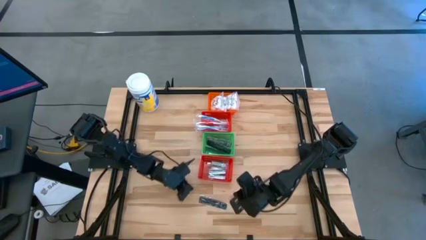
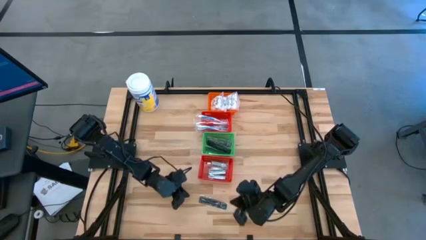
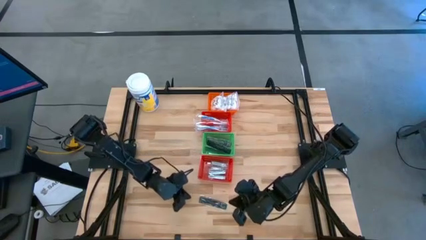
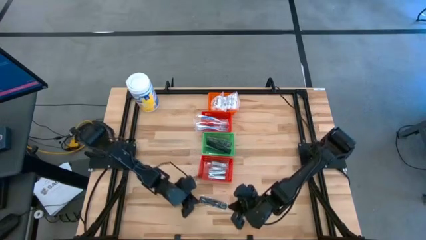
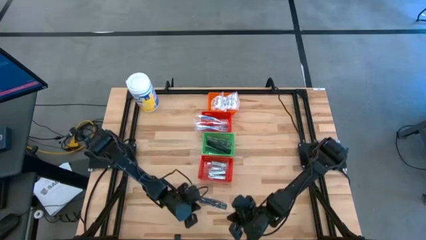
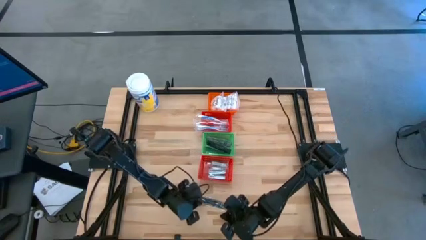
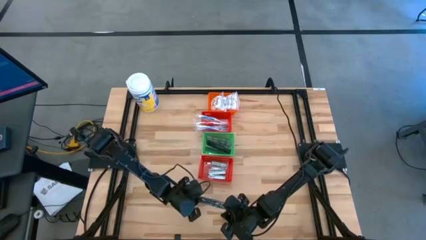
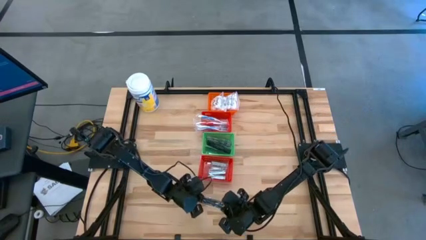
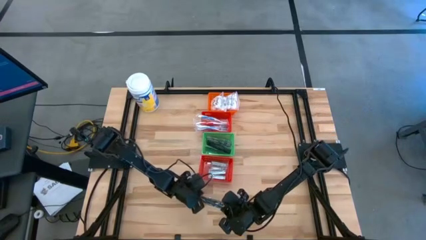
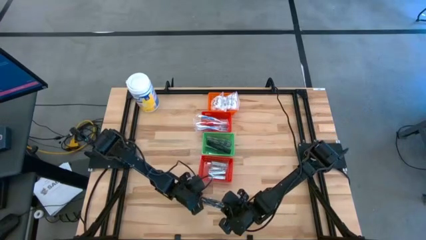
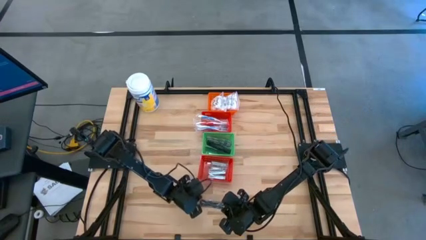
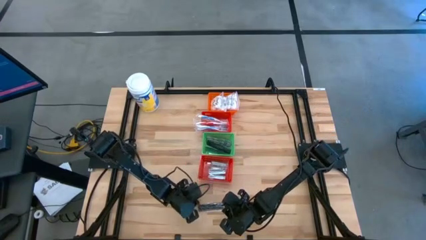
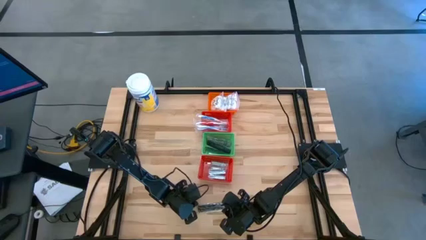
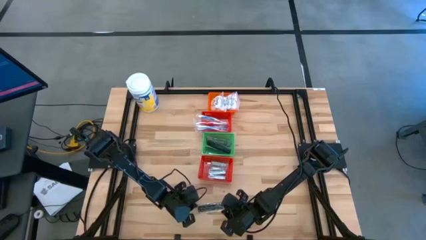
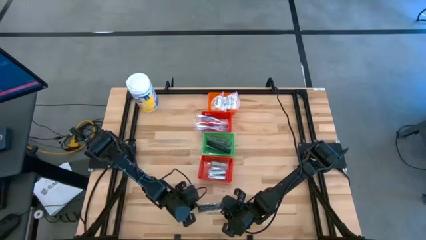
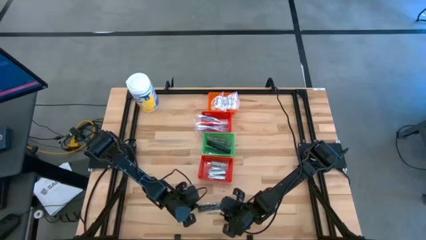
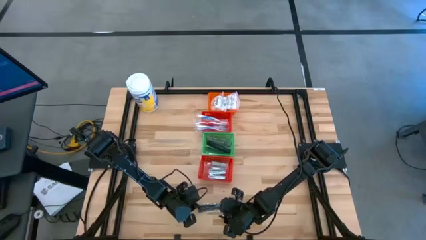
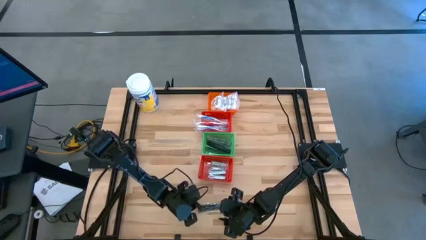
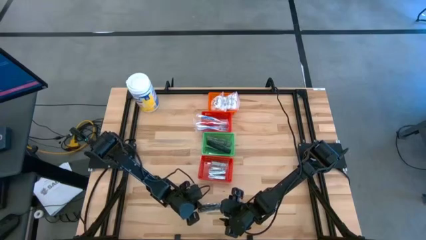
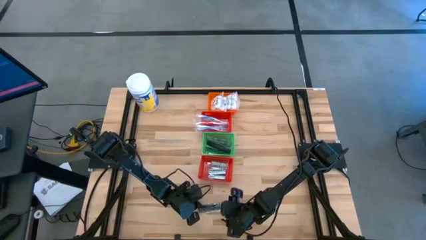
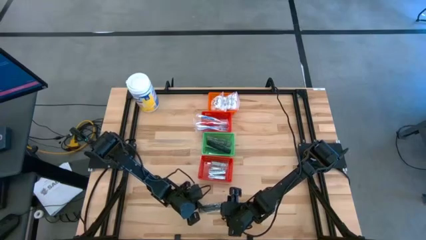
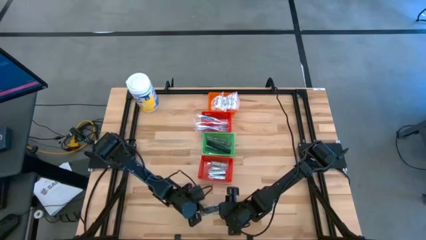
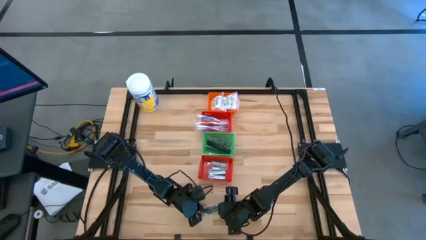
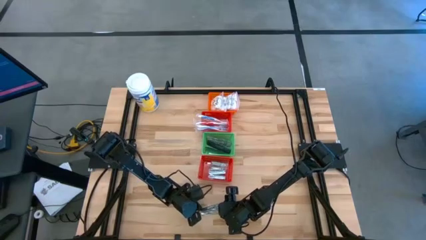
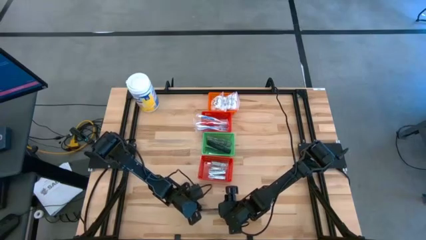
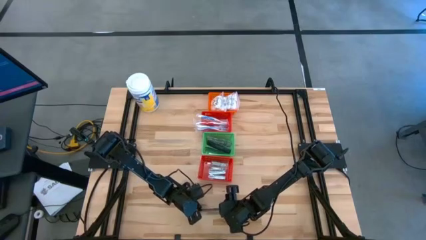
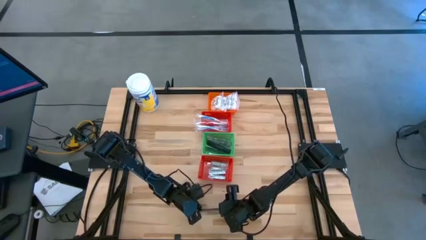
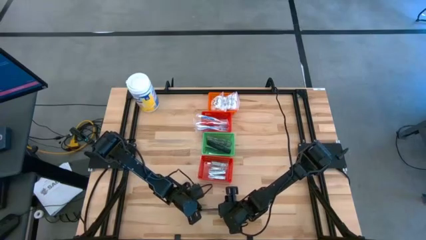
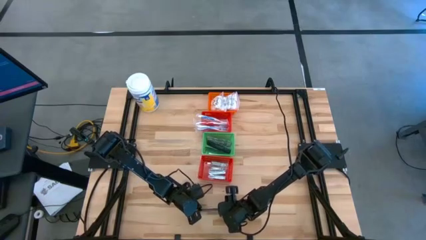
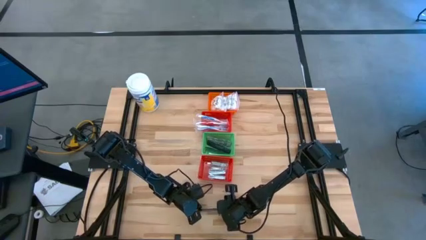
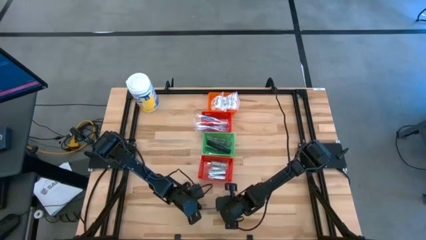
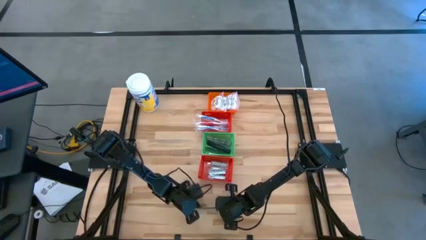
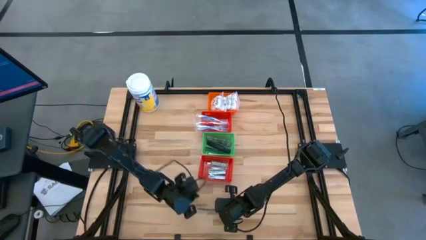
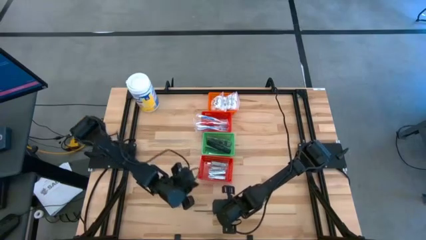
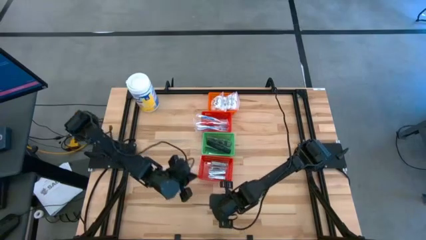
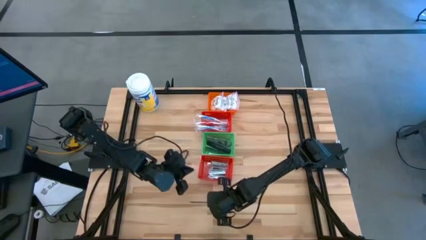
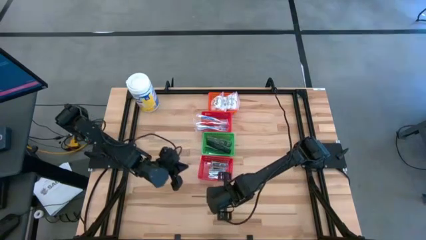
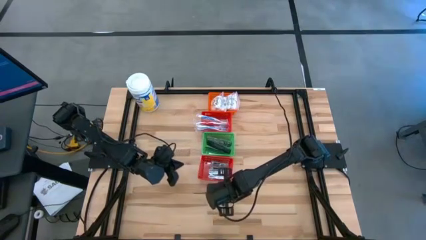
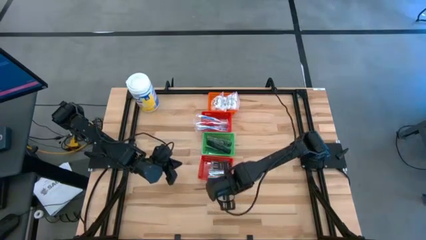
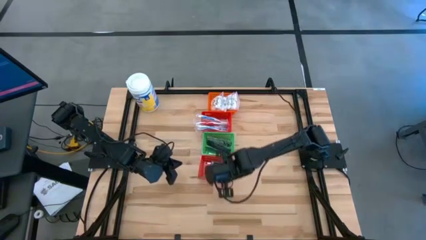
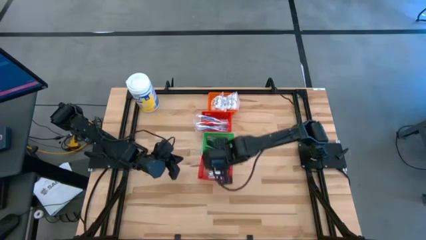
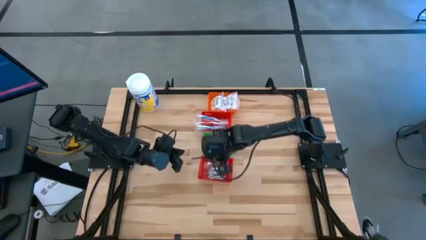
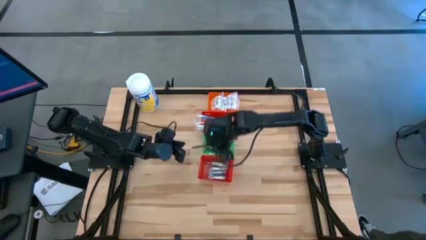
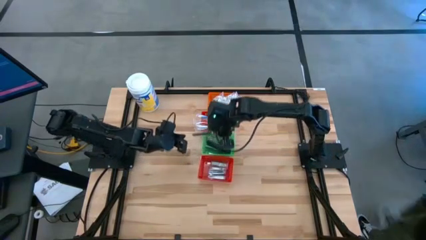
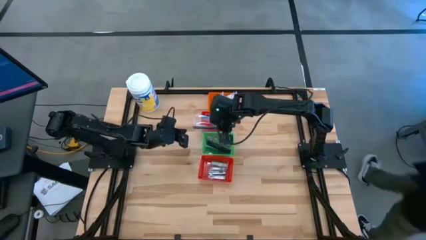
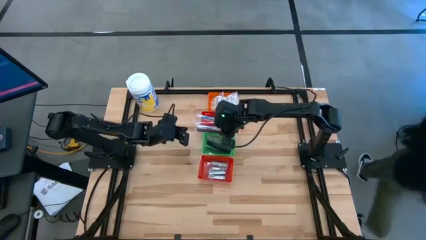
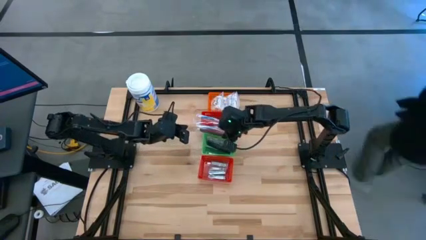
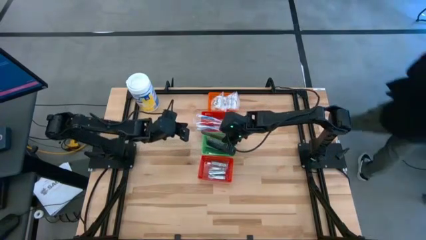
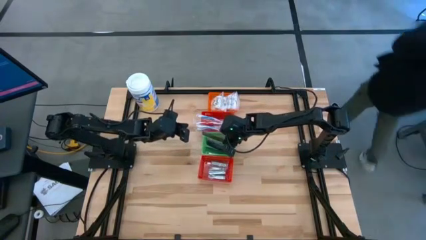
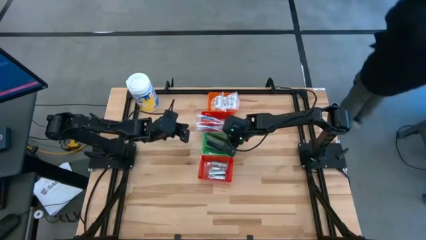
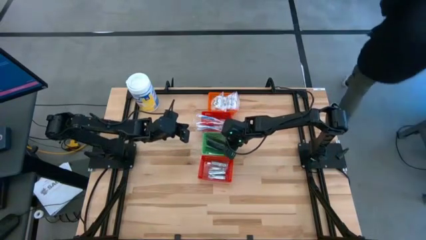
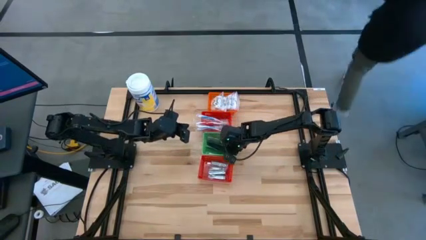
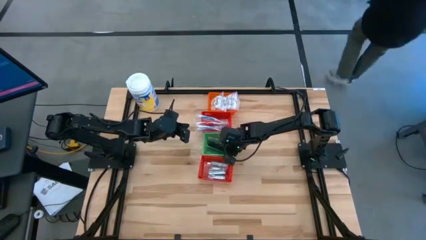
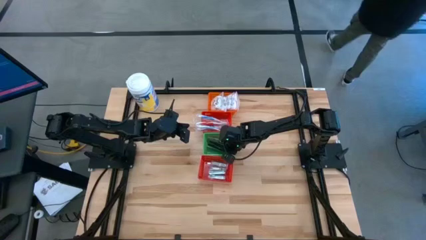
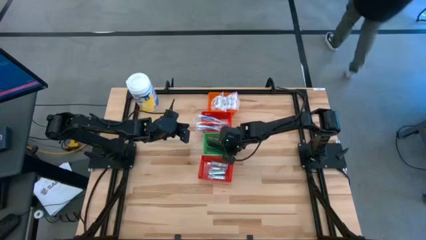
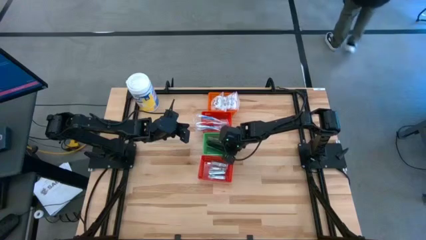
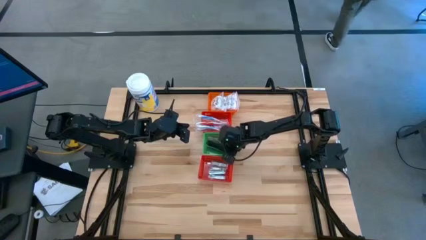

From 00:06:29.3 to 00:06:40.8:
Task: Pick & Place Travel size toiletries
Put the black comb into the green basket
